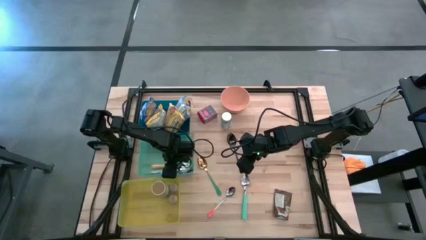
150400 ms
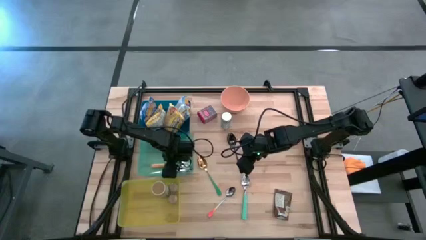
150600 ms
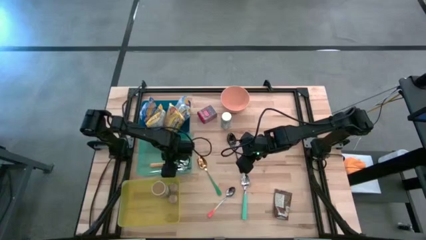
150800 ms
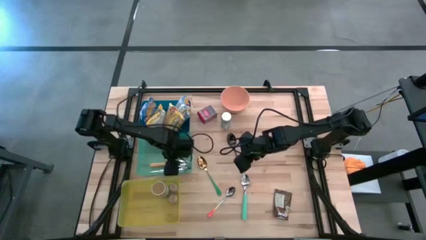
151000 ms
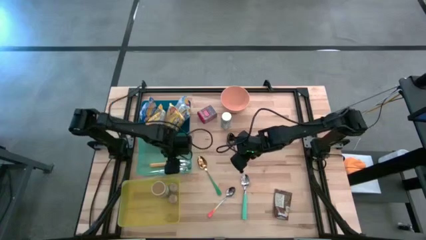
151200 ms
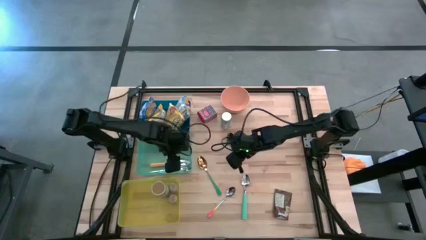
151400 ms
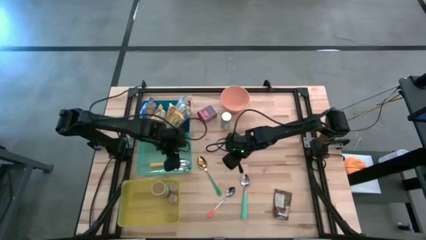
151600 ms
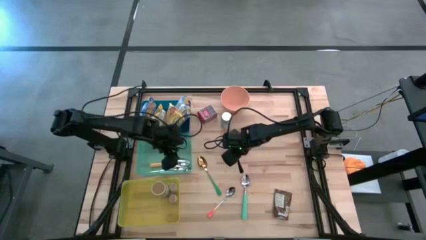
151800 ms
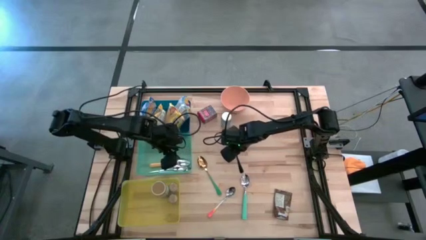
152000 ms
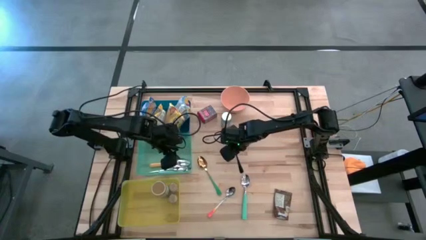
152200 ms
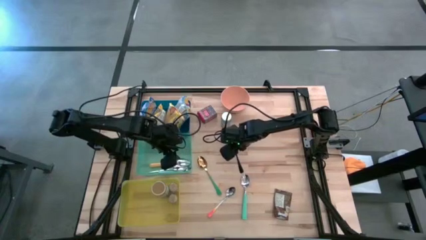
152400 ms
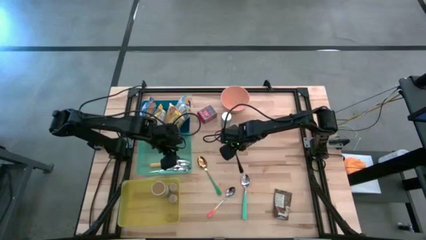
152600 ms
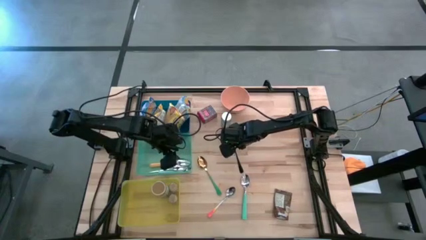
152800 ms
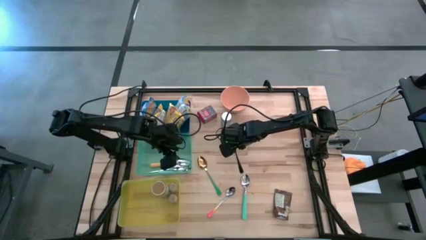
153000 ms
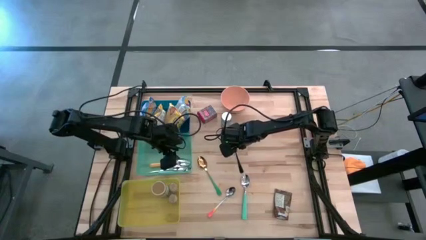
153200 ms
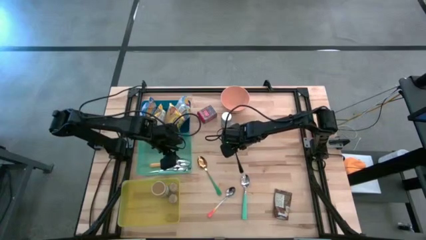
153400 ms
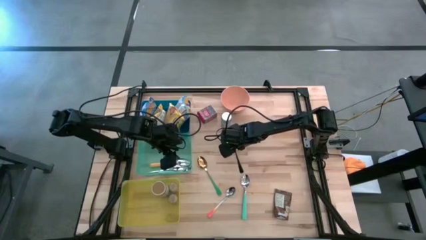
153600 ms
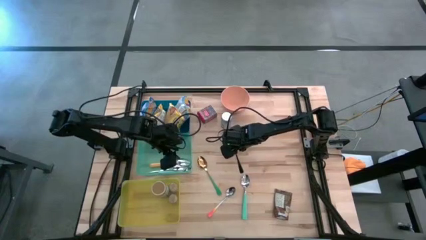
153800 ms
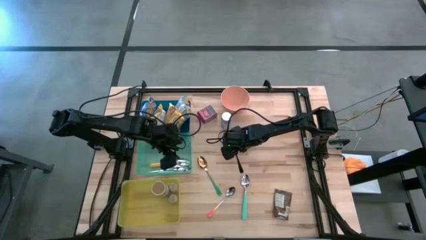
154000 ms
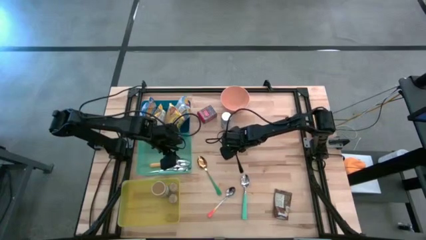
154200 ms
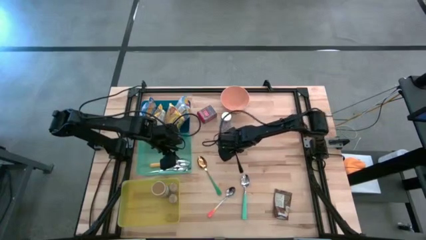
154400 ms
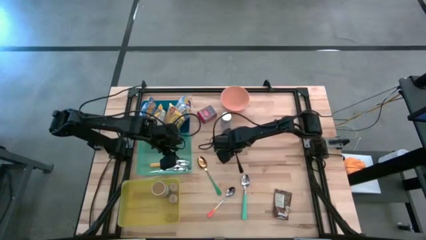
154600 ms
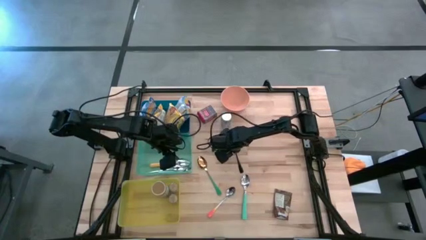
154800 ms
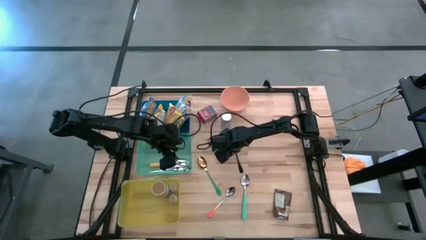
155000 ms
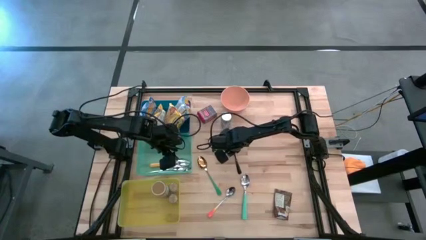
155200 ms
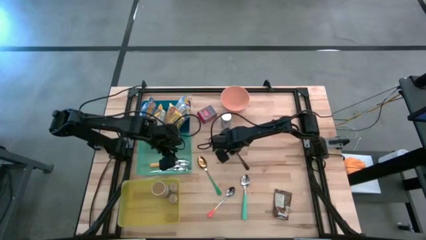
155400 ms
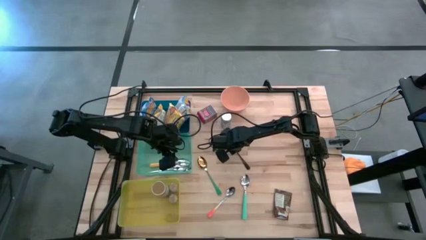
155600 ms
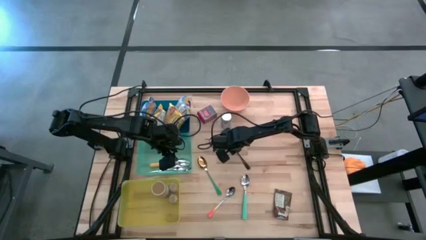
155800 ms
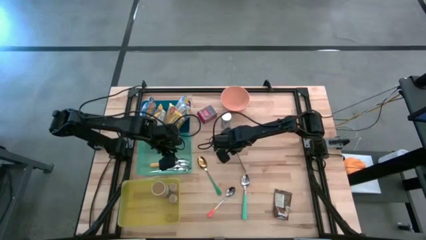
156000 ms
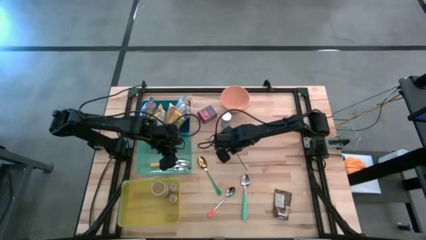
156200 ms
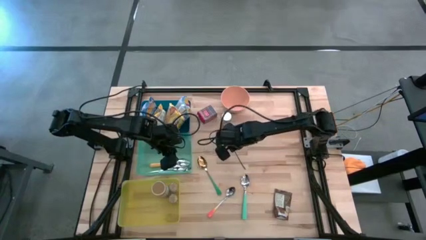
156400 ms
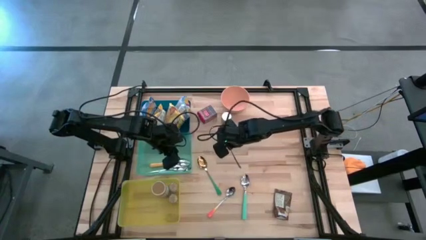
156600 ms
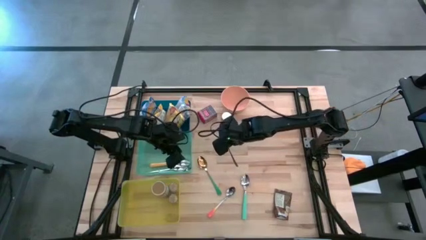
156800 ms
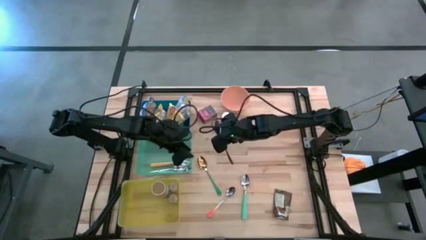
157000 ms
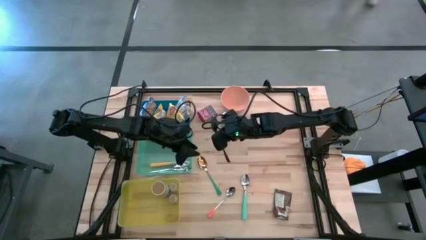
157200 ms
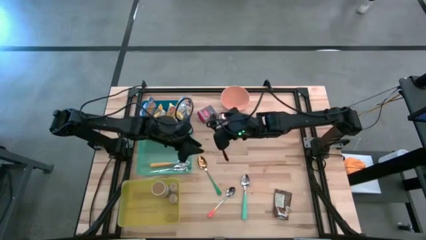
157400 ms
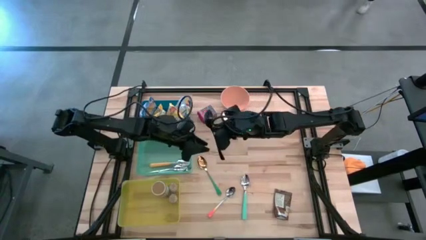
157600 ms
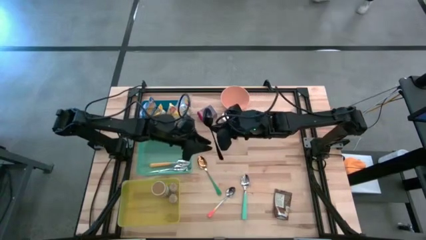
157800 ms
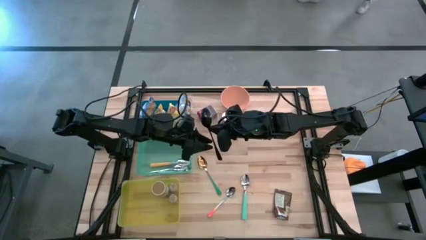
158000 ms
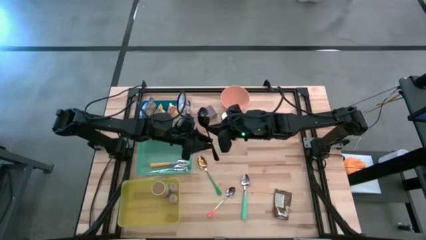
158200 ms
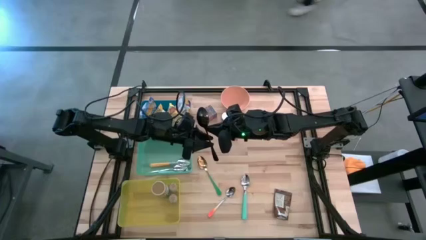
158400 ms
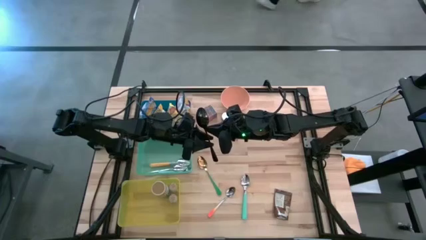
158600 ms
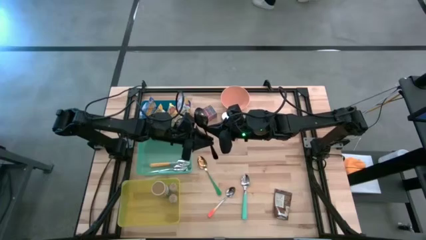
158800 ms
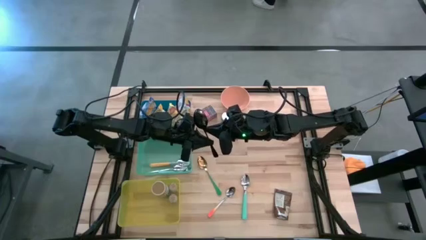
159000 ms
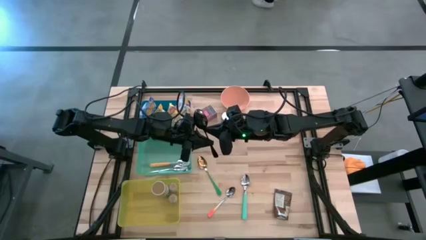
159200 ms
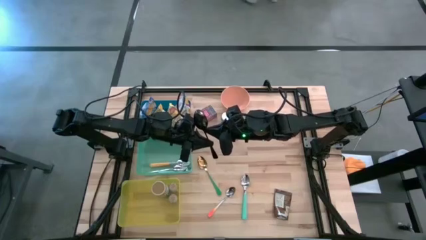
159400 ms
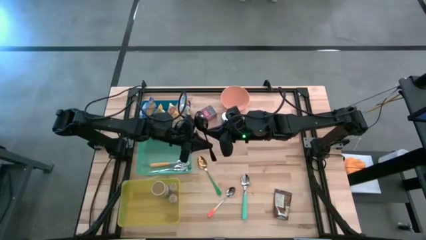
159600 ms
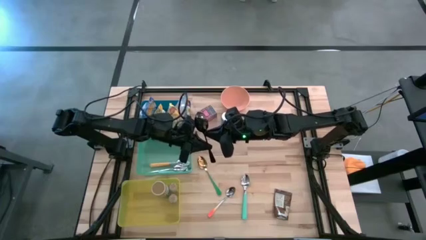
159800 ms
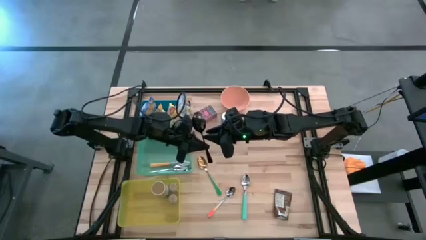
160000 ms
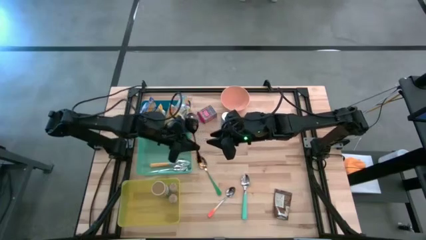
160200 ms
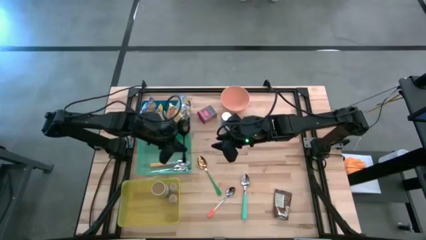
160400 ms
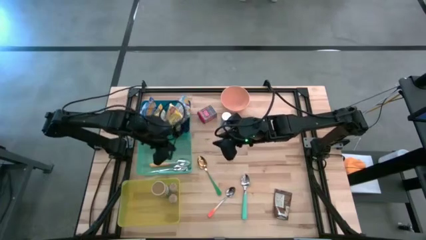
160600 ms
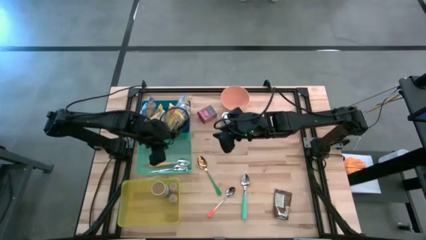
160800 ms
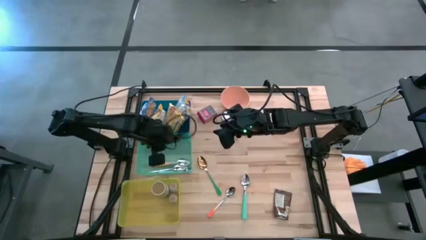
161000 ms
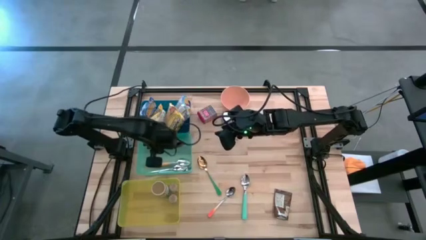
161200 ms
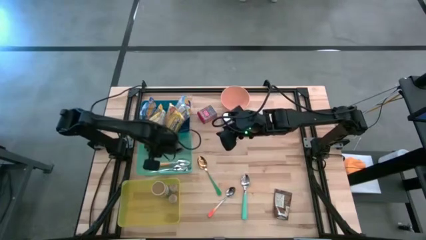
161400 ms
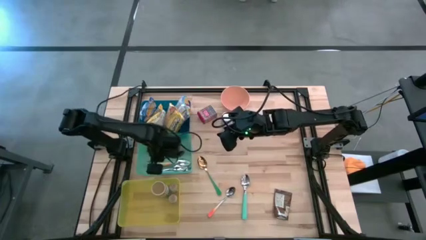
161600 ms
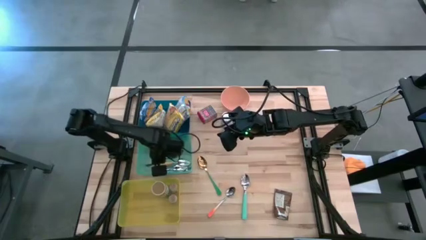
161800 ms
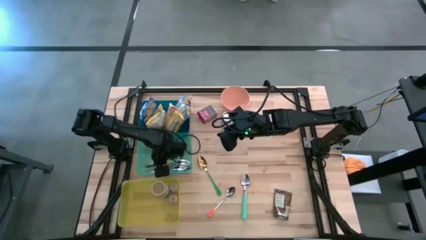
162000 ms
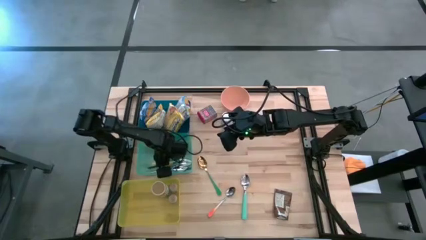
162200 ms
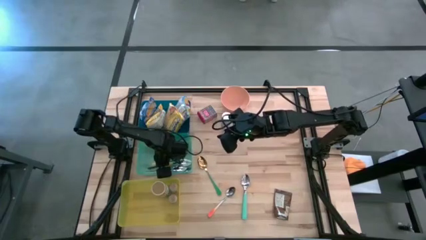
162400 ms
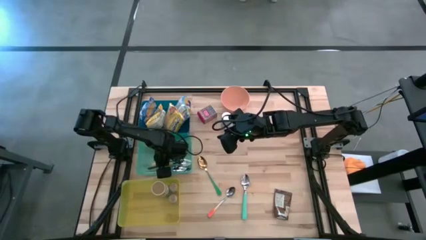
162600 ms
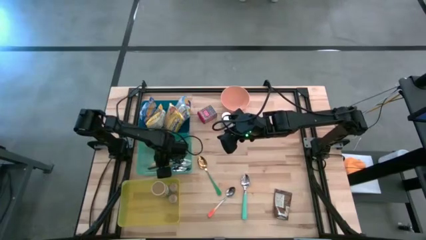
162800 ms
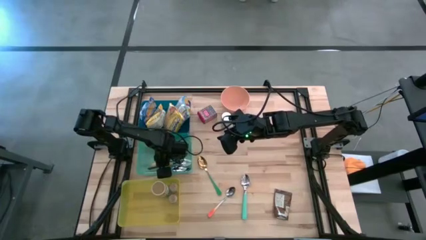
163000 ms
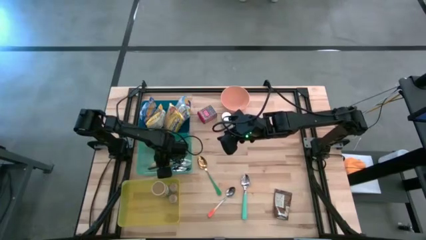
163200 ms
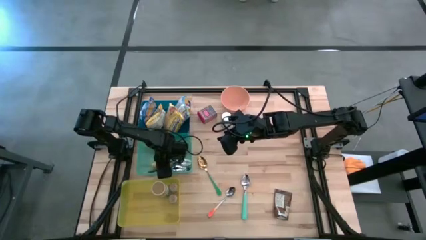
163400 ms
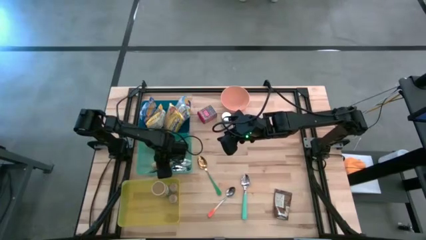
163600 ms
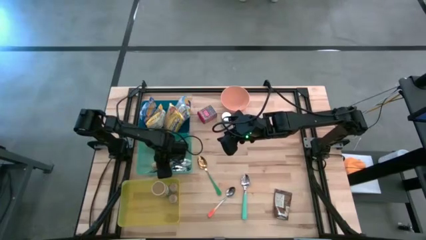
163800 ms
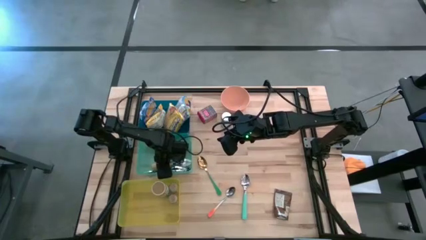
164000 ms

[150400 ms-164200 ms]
Put the black spoon into the light blue bin
